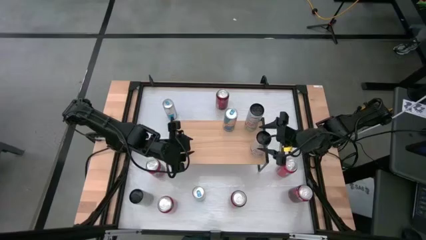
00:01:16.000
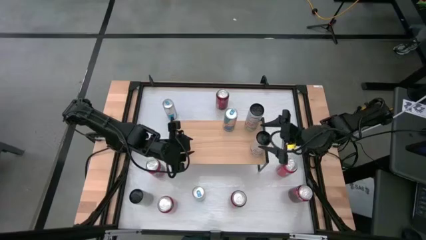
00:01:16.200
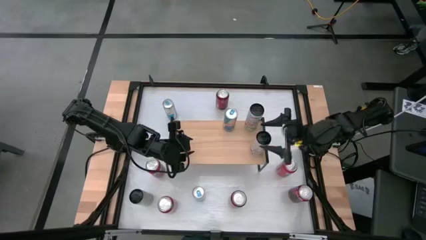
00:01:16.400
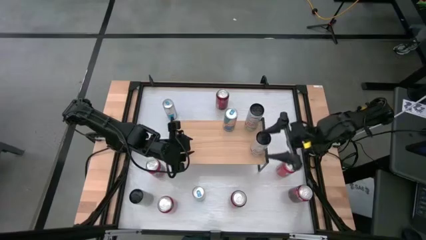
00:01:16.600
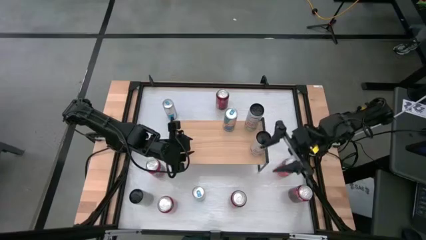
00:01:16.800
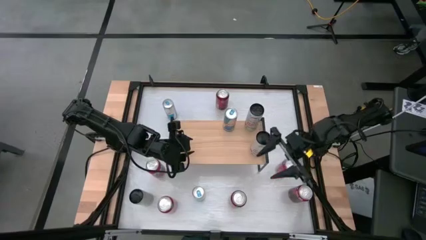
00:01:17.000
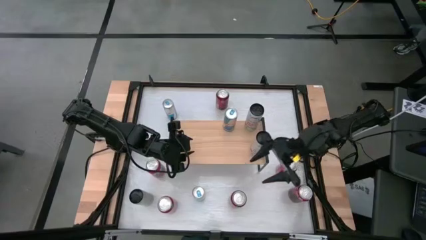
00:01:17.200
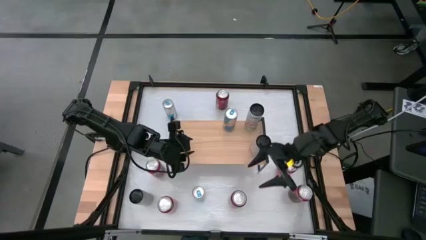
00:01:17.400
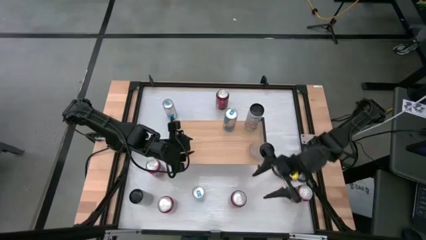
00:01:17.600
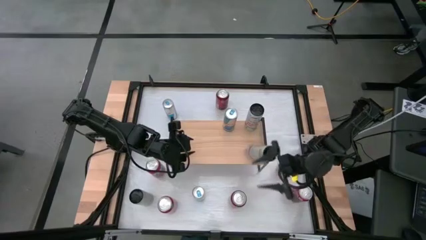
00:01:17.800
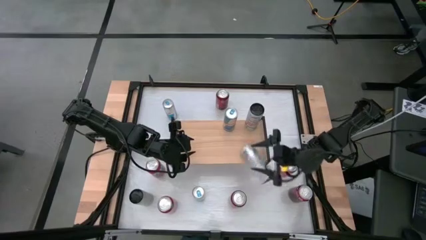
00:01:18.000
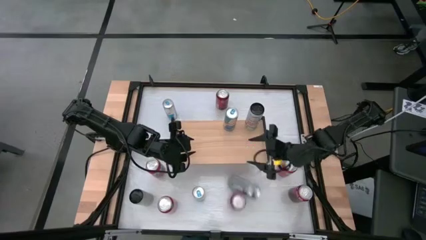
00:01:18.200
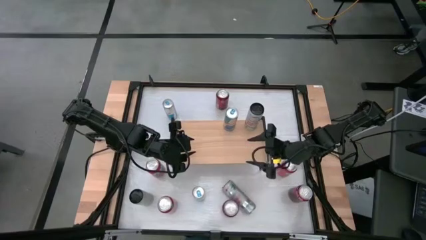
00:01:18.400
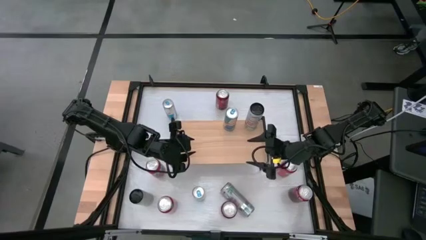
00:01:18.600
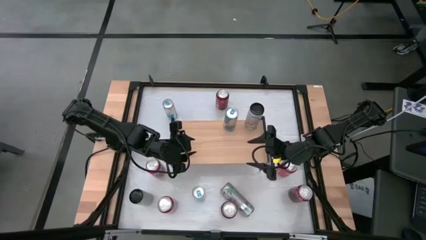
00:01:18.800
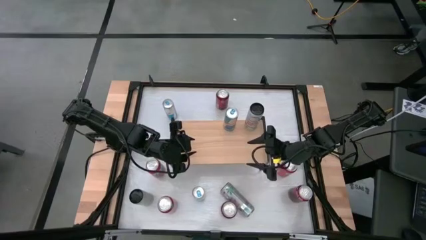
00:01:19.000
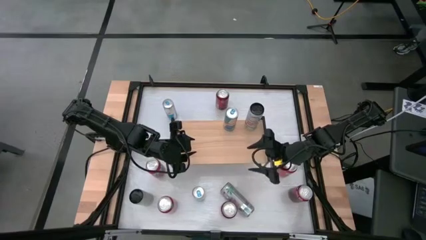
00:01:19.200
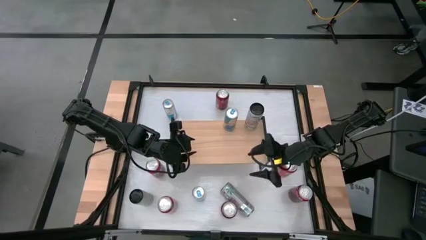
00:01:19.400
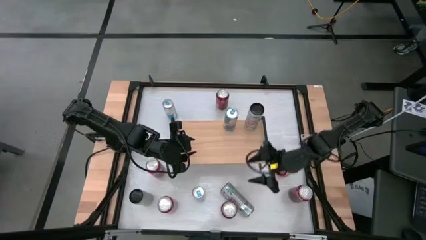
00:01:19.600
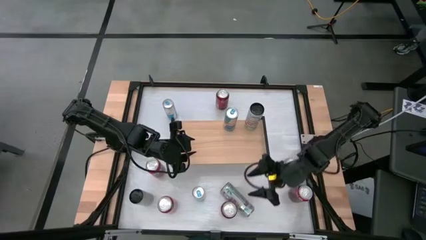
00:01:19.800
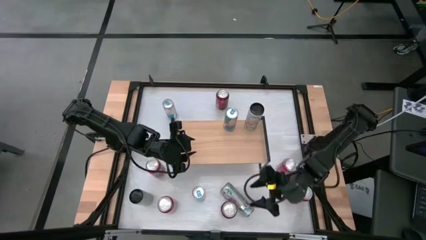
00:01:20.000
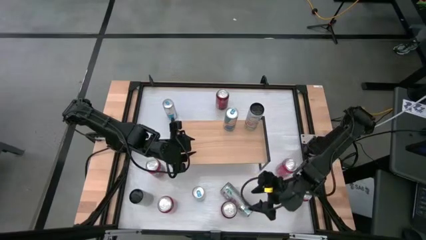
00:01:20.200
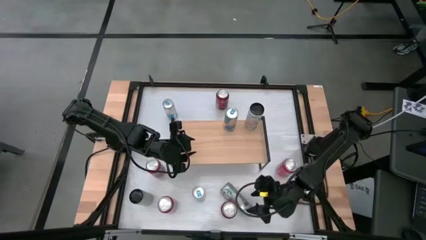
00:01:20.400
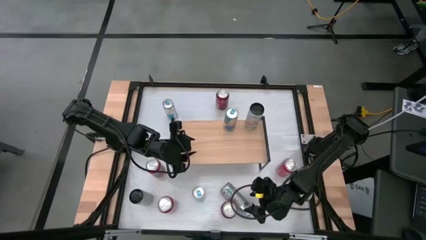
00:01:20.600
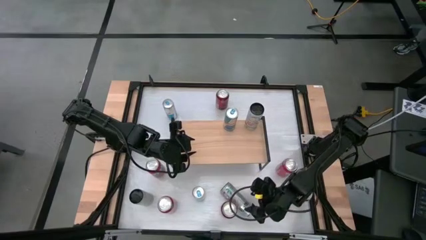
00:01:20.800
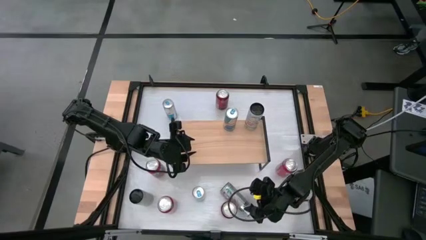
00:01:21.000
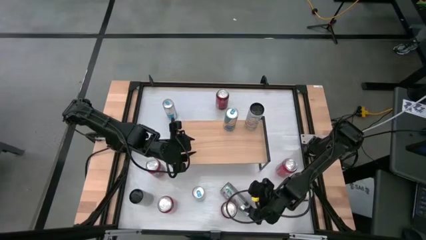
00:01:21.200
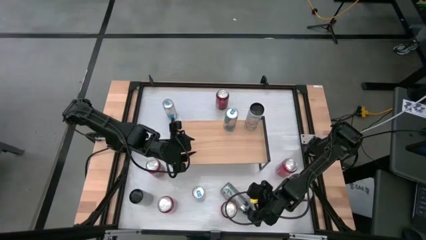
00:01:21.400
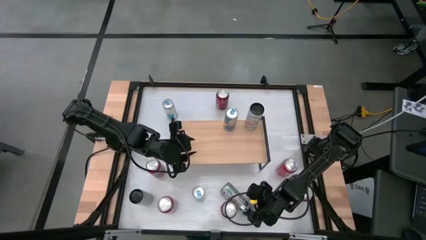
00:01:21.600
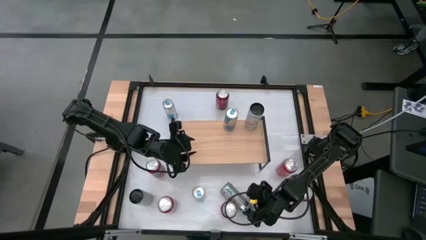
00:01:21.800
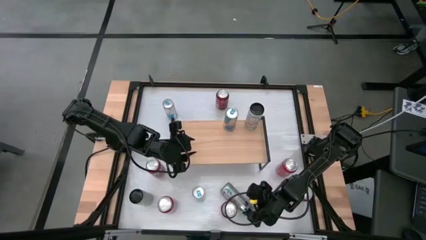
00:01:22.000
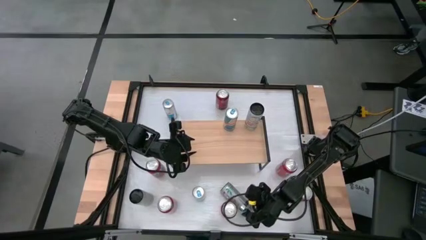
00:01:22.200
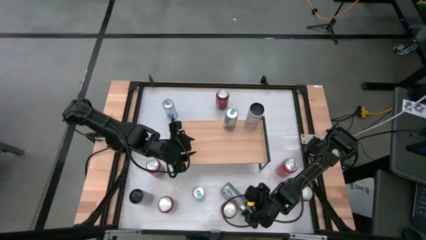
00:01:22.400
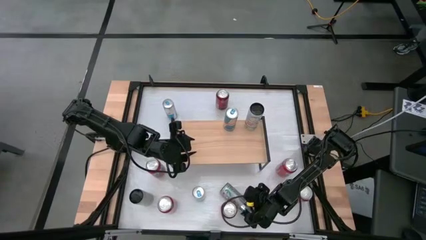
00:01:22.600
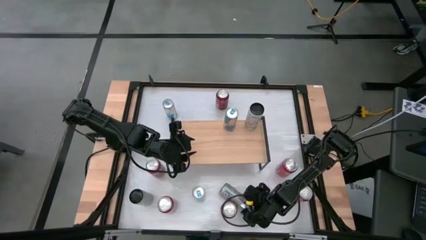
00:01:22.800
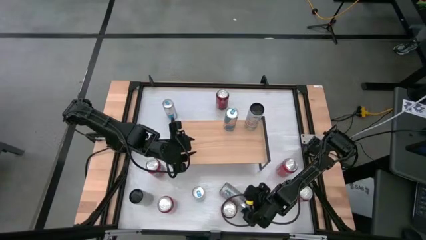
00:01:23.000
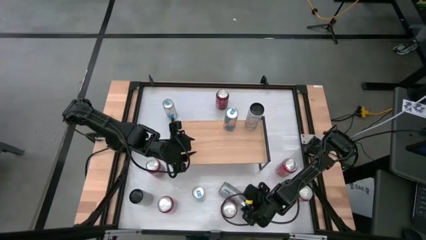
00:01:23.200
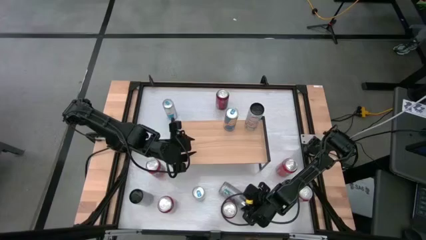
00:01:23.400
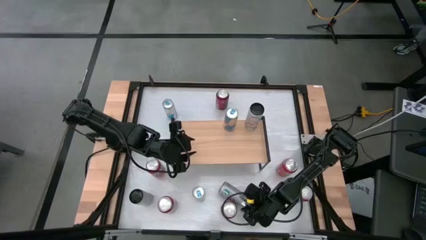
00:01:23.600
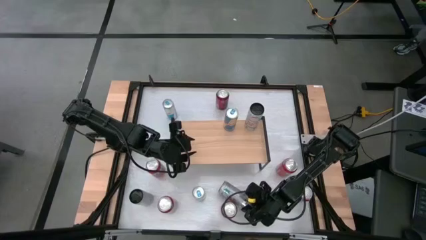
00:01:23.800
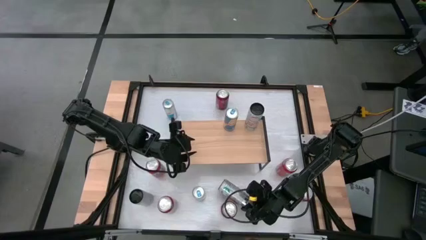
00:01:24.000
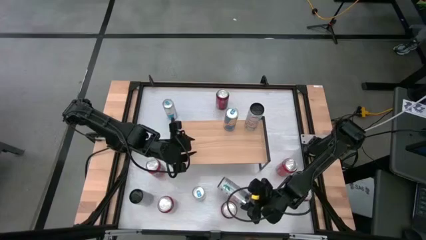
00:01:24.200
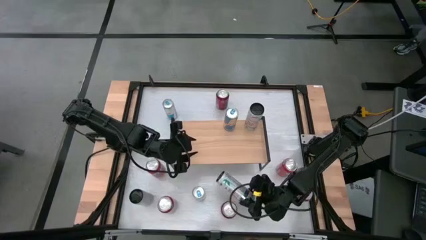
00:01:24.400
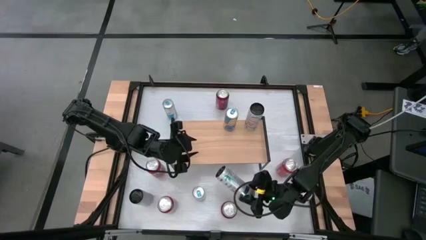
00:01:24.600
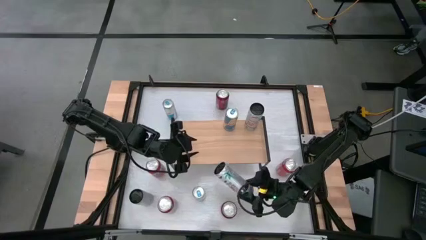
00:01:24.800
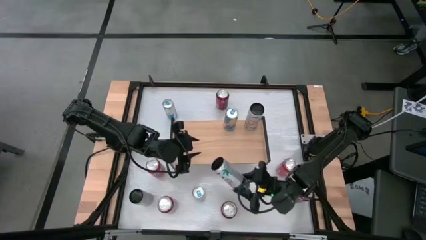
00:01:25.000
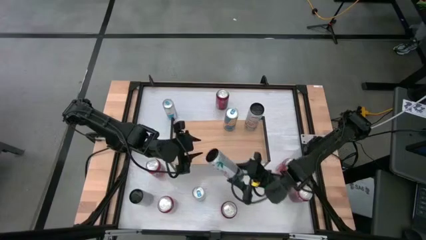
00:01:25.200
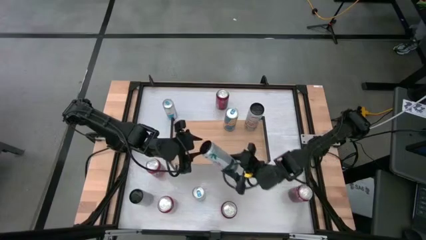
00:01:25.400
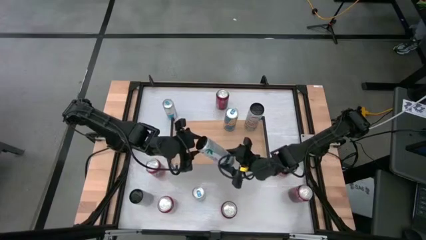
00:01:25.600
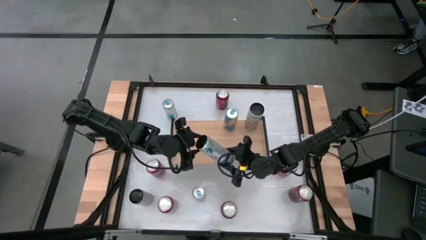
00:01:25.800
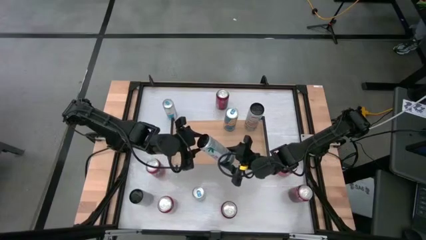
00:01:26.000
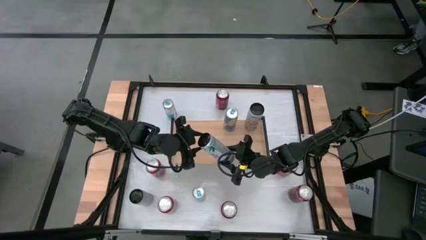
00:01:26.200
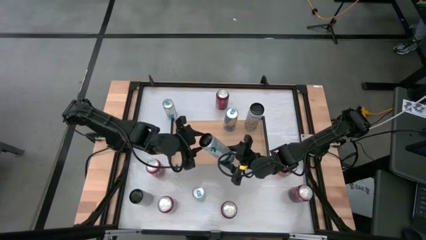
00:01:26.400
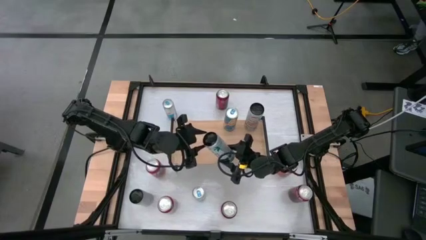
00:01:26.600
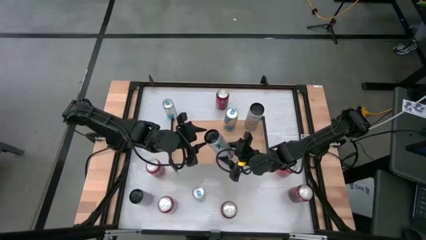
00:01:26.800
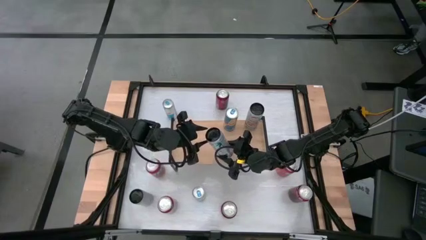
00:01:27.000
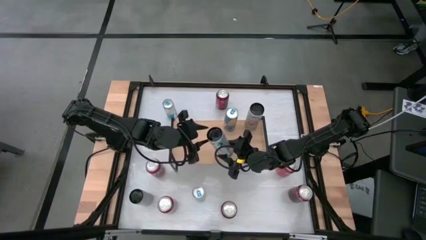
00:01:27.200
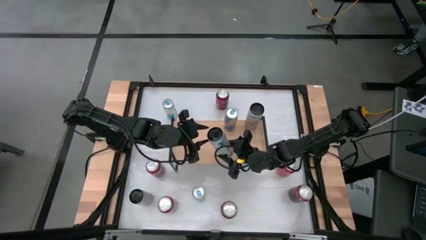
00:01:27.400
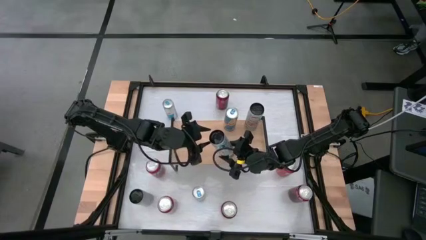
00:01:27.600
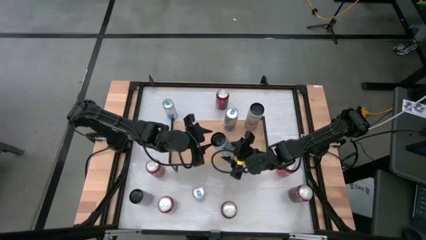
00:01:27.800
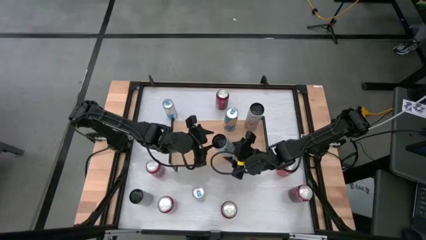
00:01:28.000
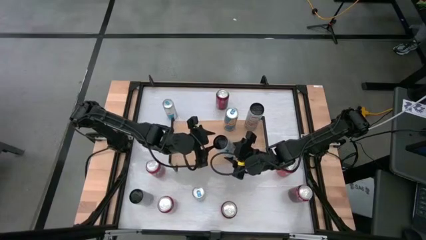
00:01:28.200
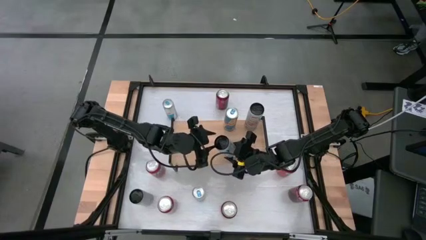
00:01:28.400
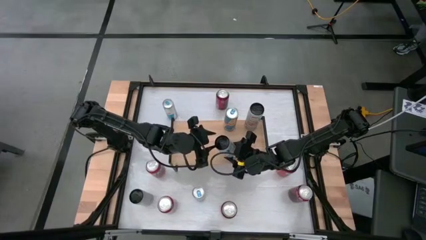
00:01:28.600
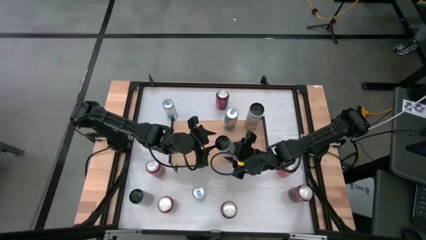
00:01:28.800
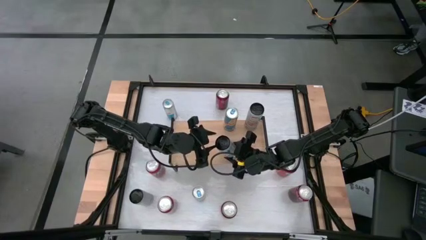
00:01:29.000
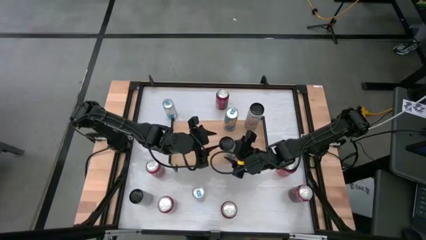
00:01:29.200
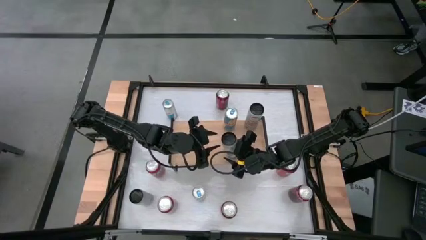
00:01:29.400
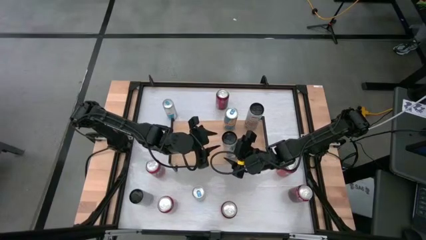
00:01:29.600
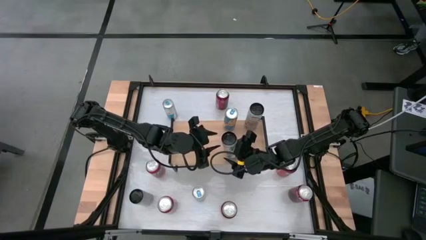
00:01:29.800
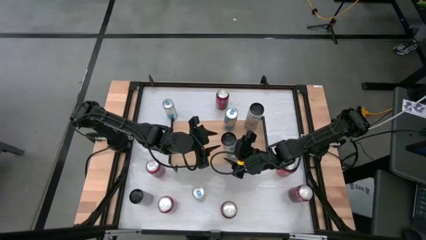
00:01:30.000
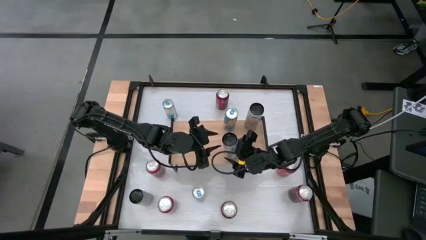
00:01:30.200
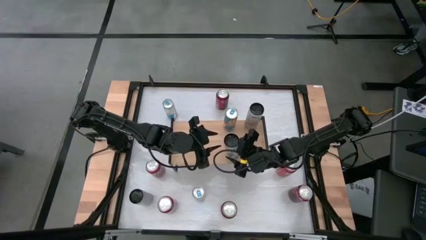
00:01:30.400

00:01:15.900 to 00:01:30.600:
Task: Place canned beverage on shelf
Put the right white-pink soda can on the shelf aligned with the other white-pink soda can

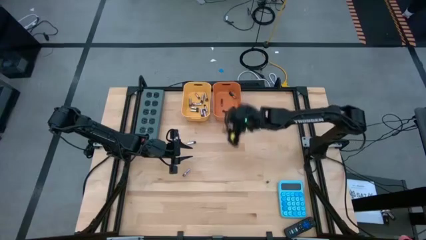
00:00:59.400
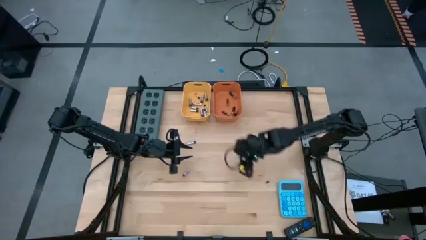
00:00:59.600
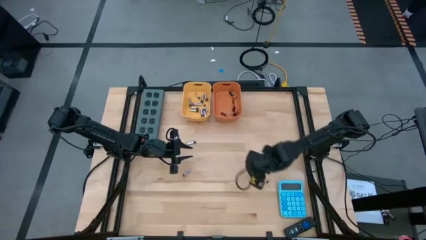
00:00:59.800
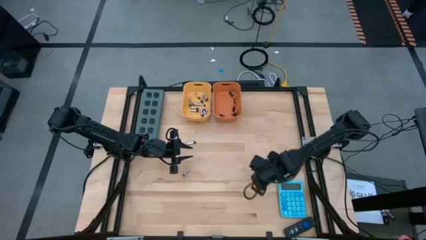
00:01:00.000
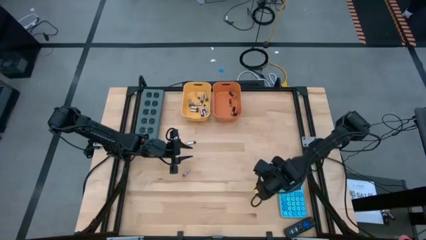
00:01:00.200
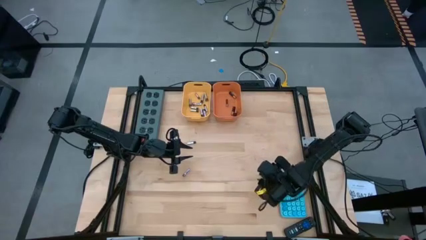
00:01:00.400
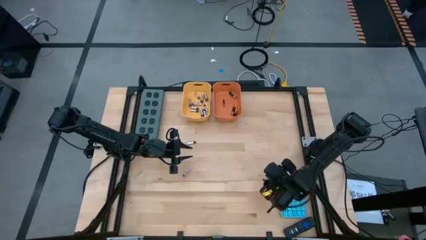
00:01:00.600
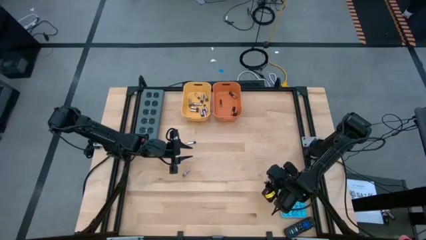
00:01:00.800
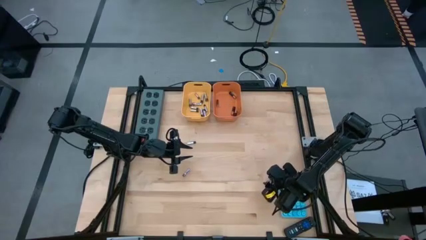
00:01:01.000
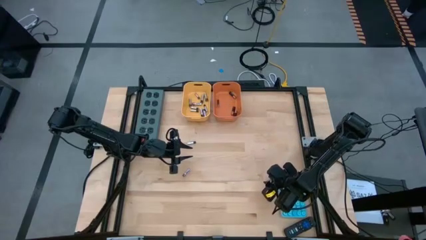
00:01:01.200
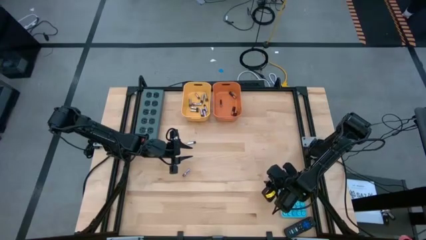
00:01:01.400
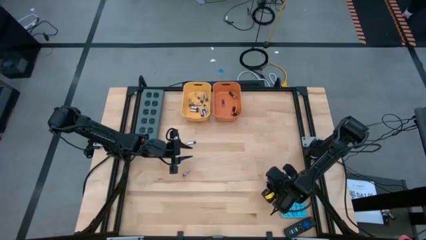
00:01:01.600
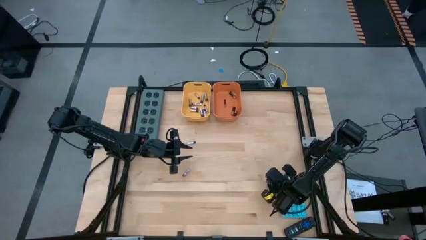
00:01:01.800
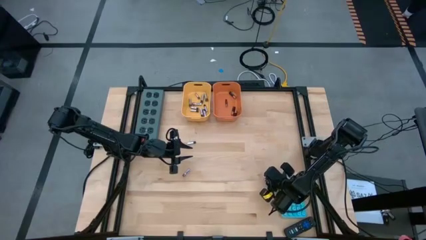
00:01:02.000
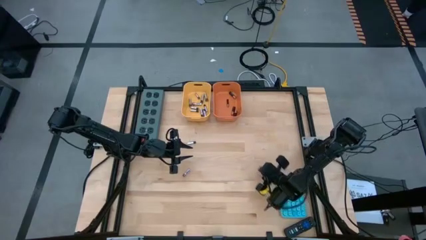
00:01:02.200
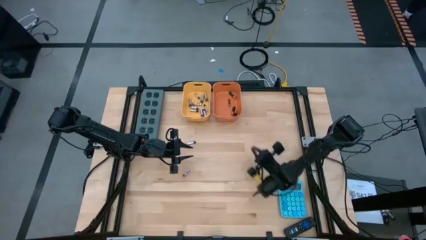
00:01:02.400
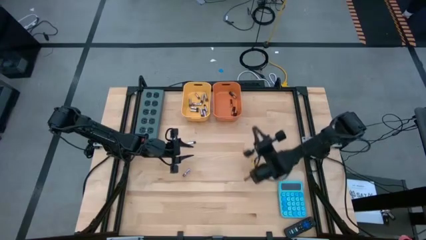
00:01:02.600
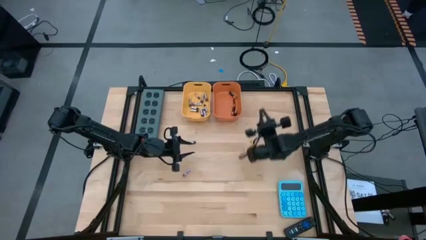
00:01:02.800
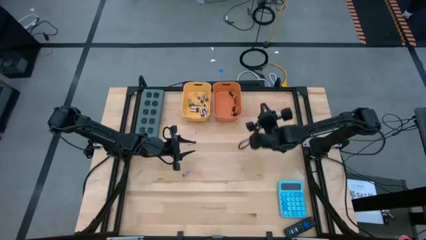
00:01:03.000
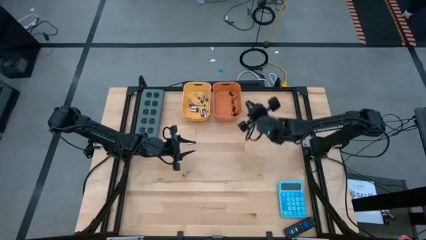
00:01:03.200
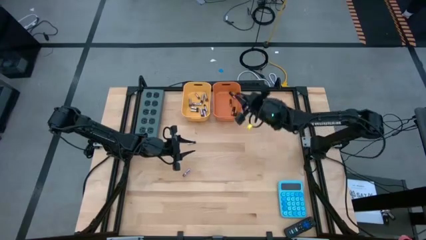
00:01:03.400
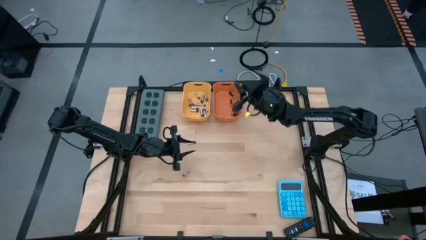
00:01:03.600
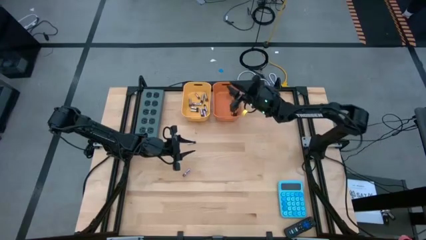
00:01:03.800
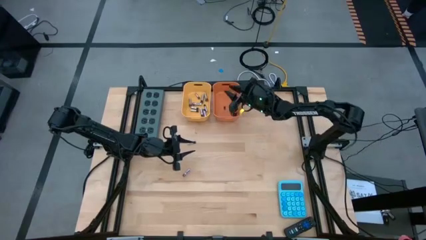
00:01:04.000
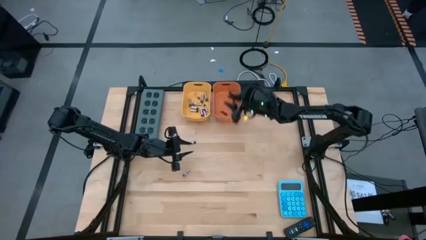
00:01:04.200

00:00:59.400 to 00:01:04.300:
Task: Sort batteries
Put the black battery into the orange bin
